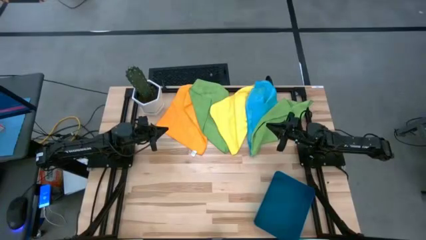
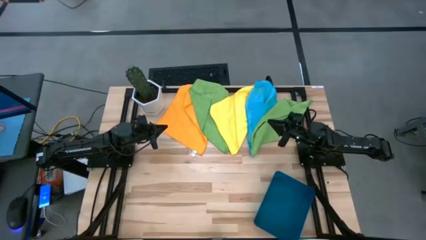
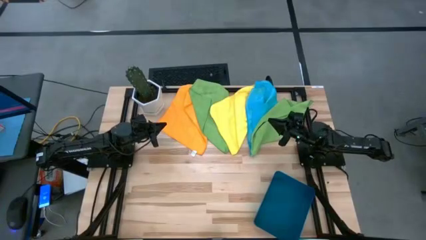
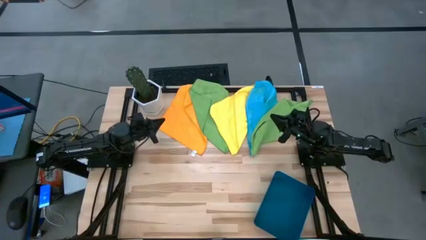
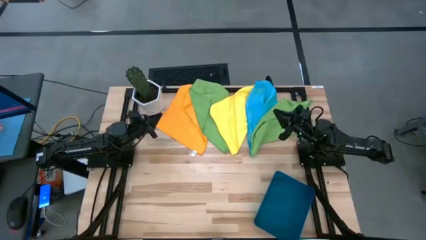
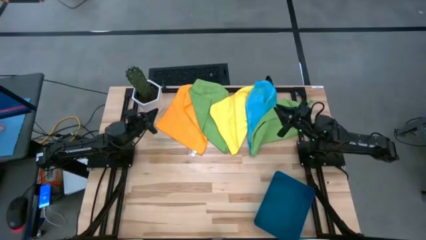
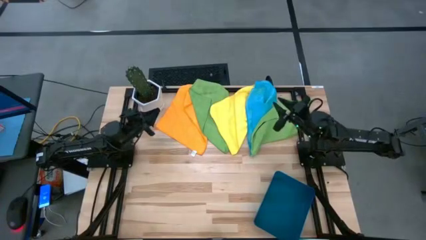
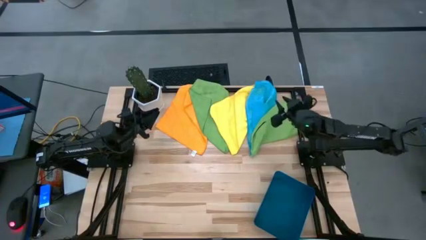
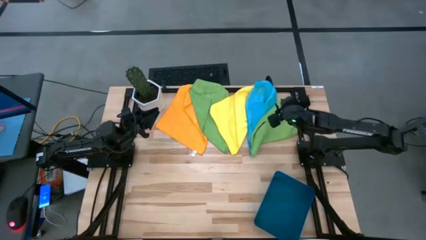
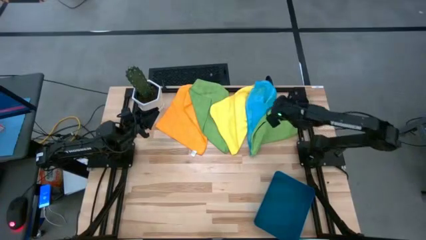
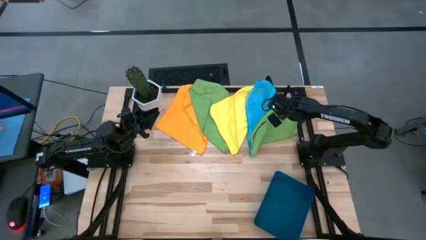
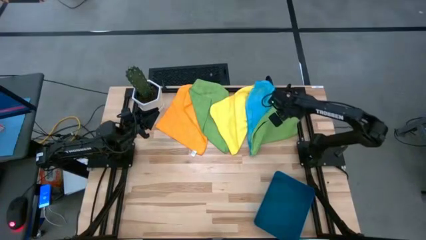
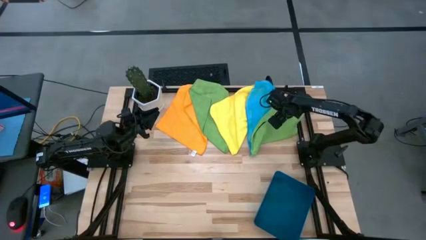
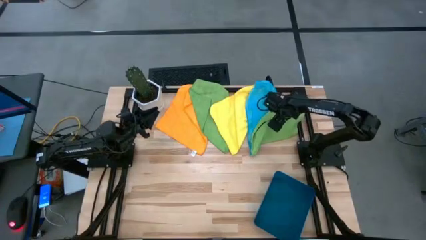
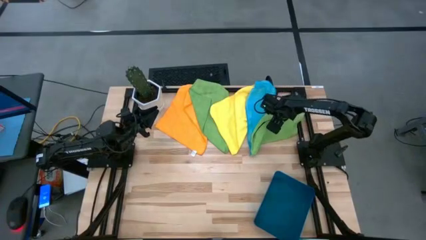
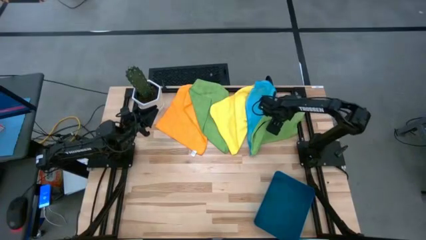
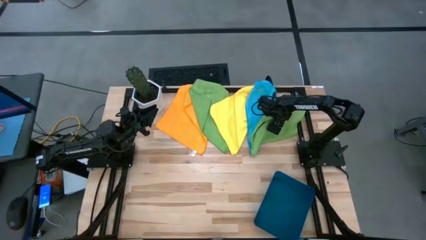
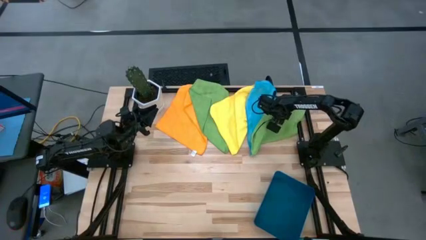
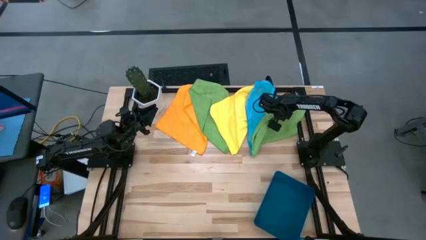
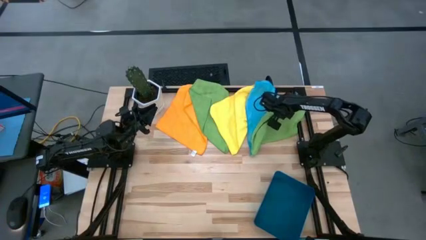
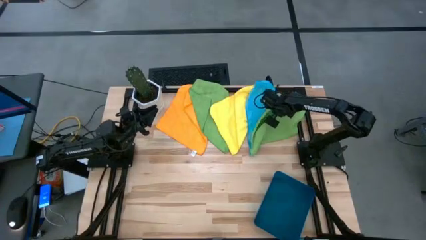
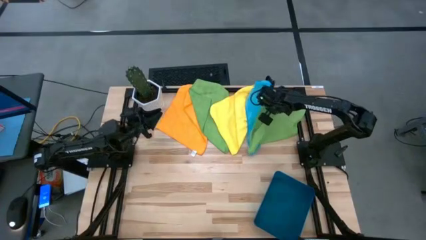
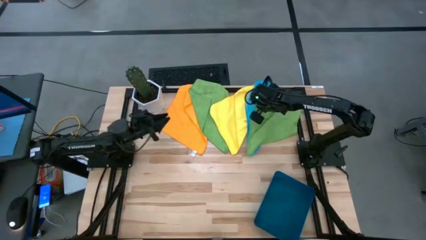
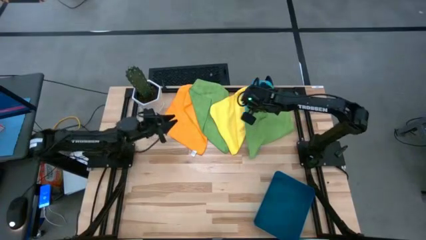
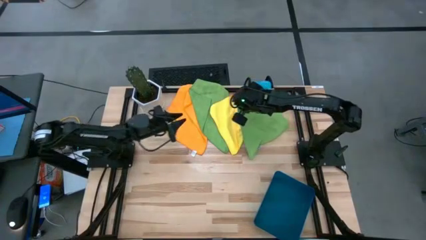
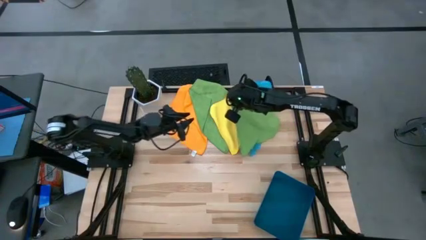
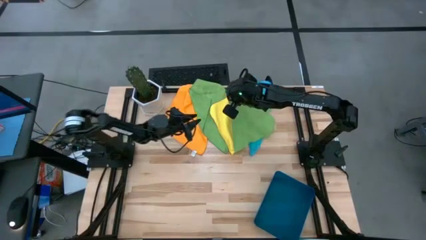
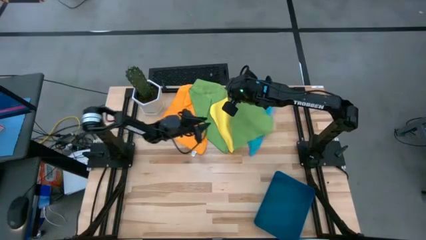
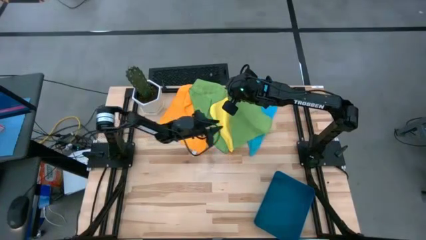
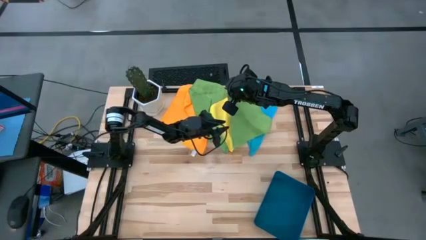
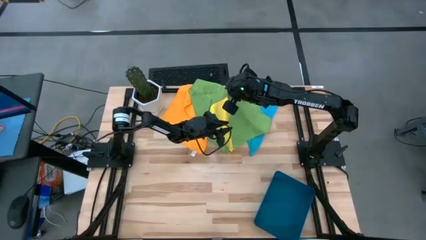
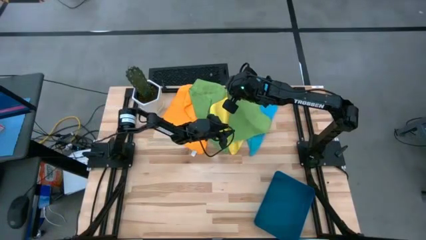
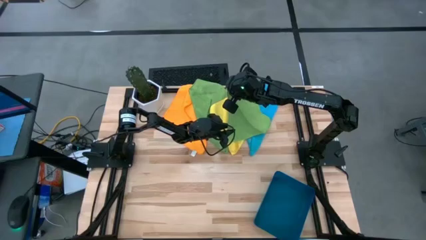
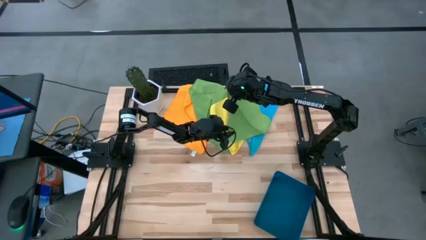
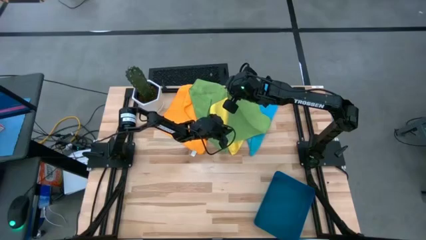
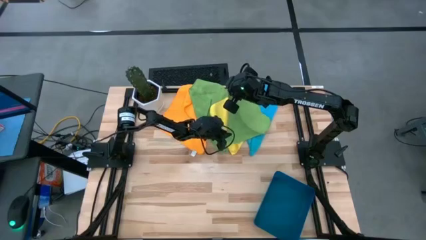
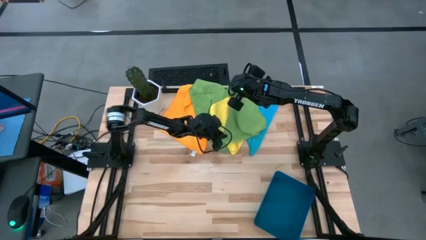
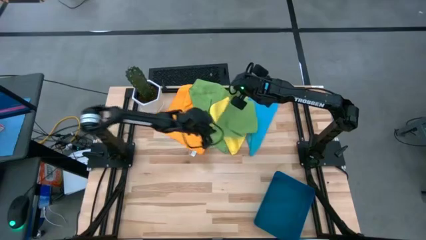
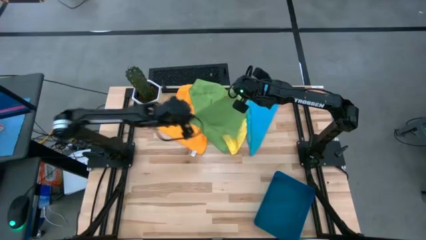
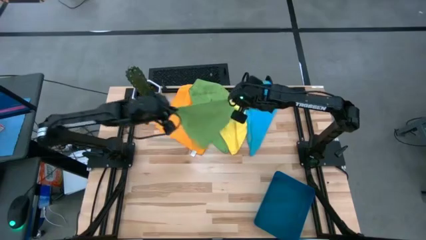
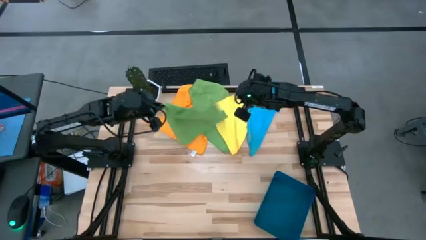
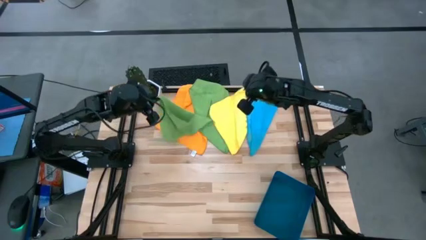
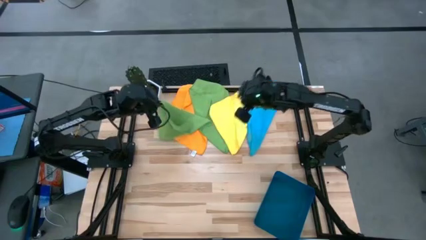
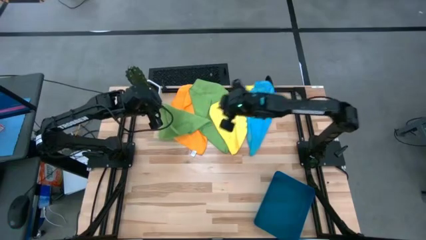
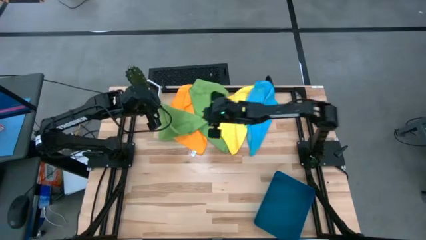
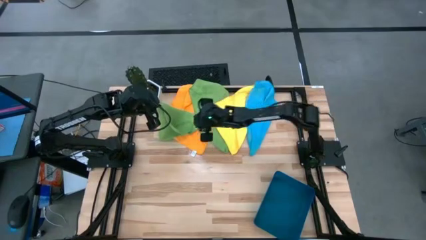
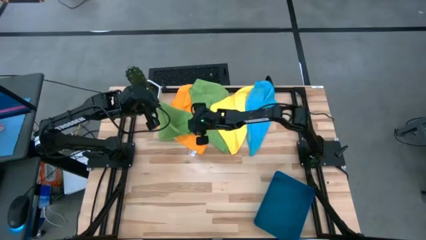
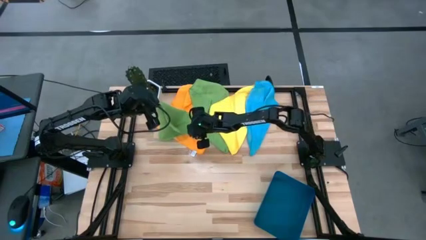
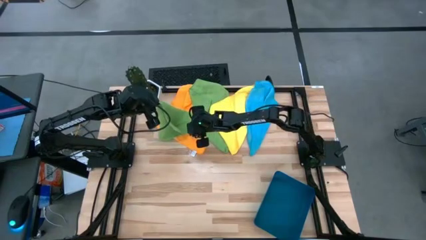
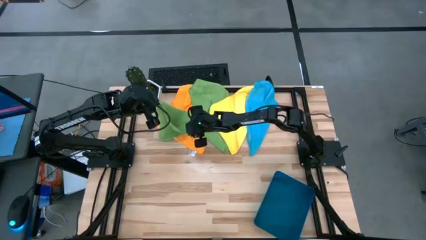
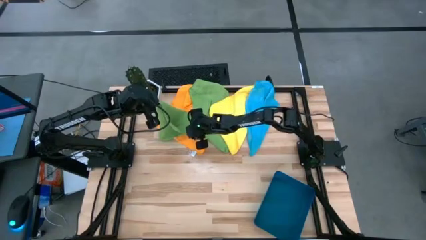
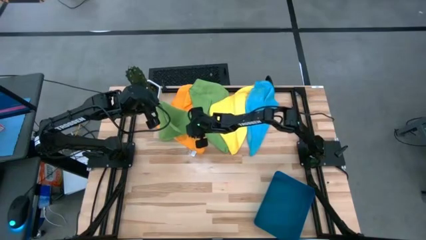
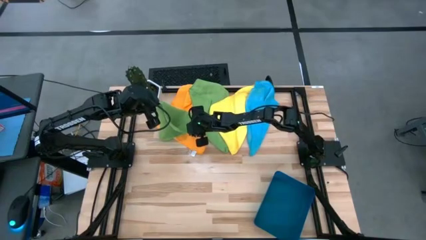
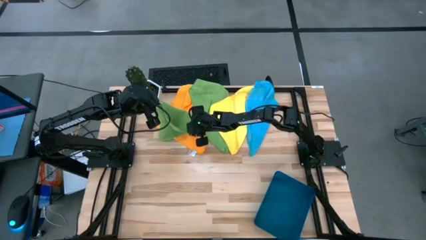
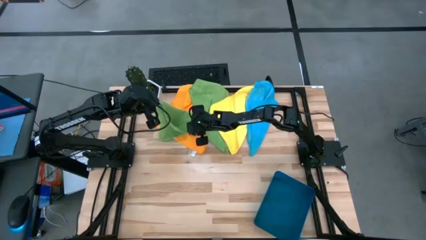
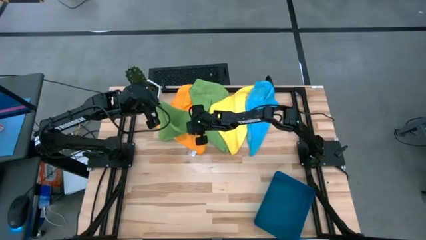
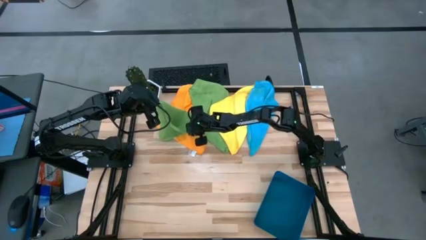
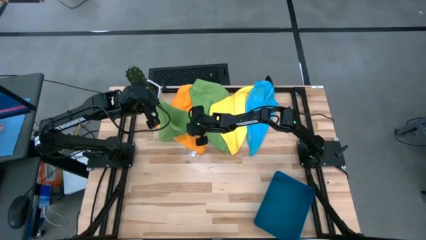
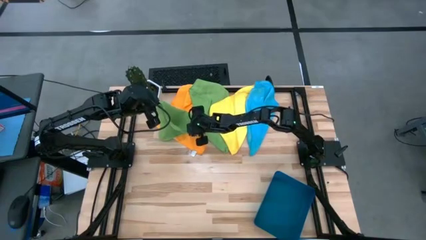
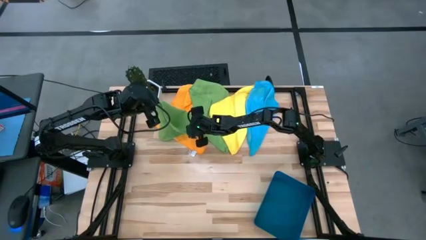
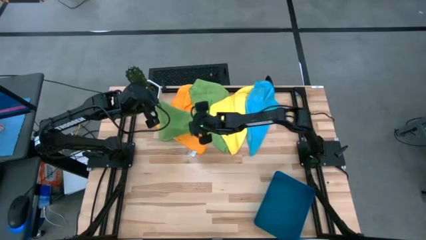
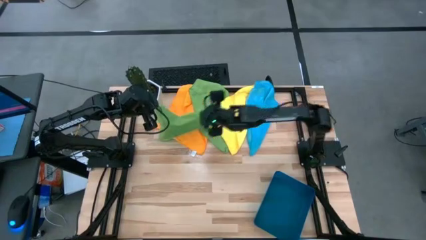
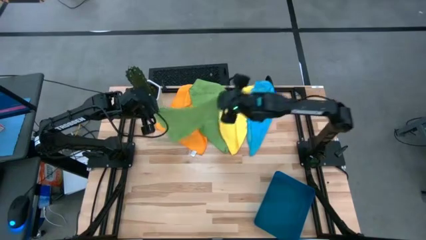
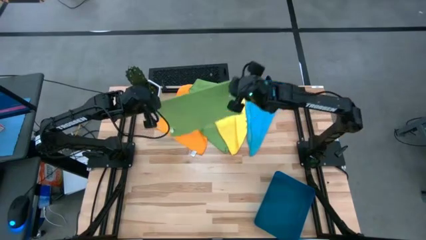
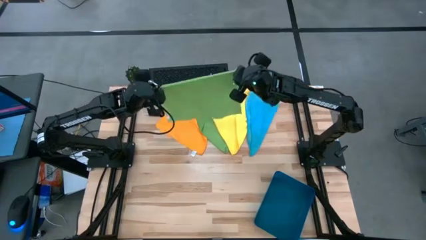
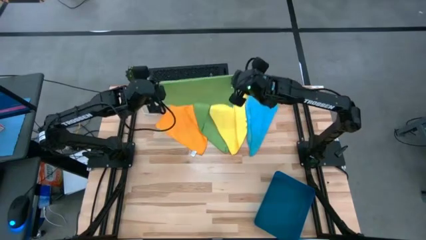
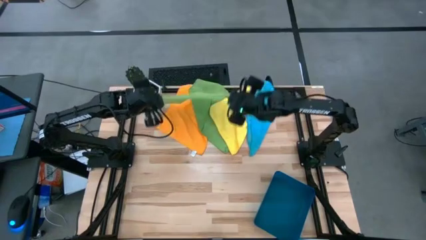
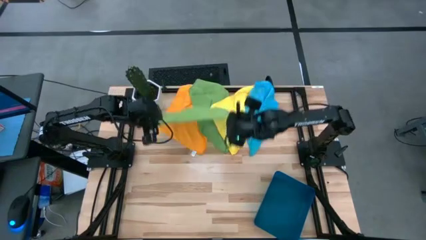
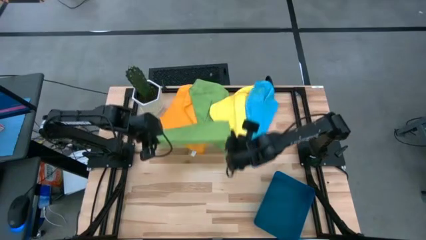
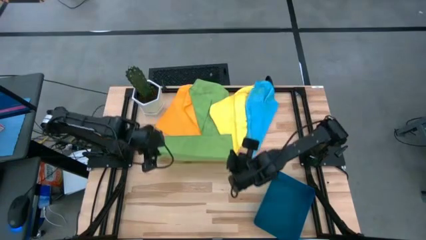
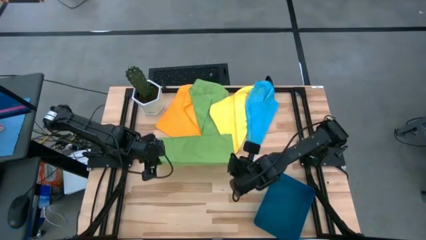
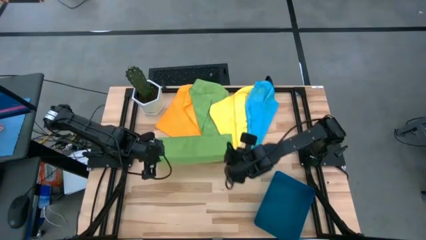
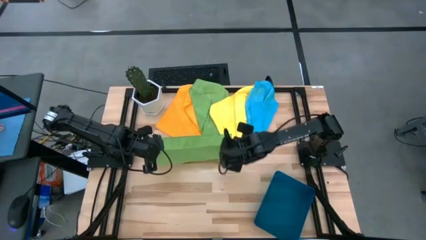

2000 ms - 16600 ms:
Task: Fold microfiber towels
Fold the right green microfiber towel
